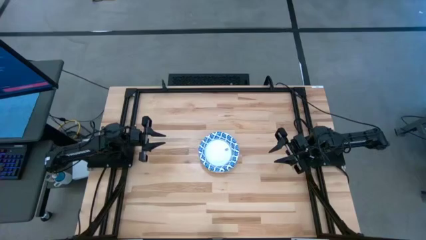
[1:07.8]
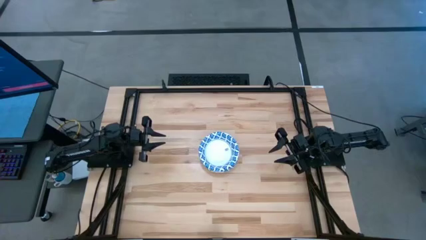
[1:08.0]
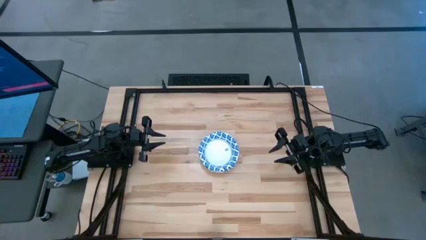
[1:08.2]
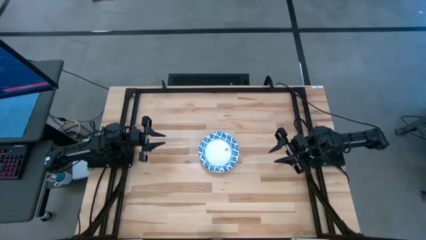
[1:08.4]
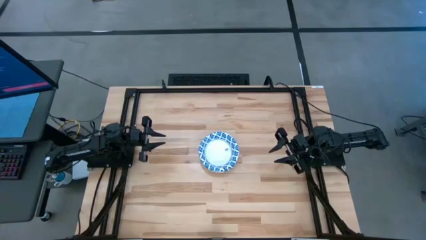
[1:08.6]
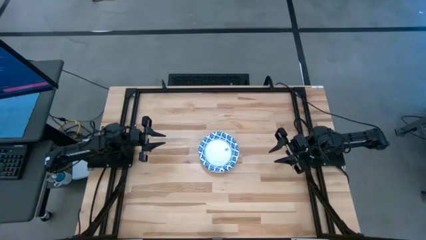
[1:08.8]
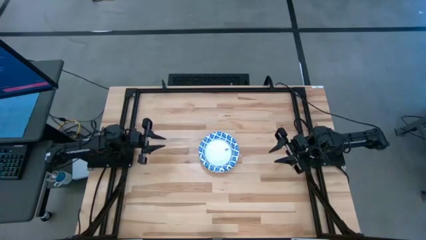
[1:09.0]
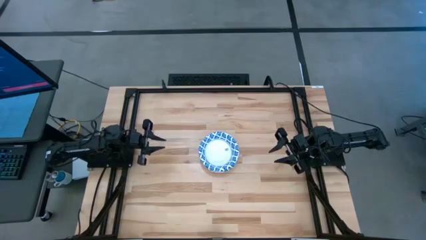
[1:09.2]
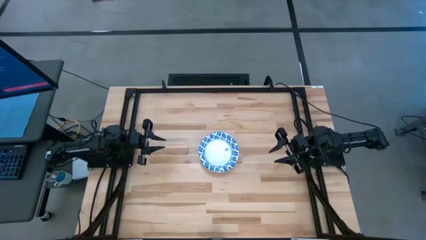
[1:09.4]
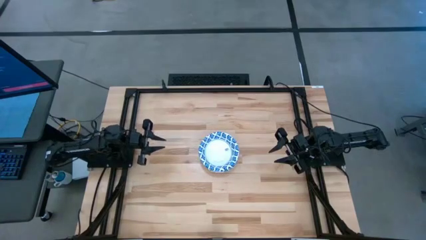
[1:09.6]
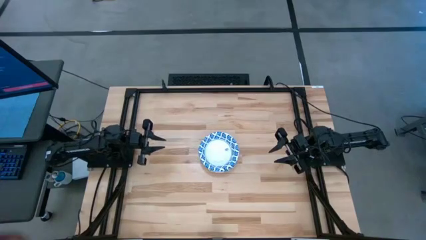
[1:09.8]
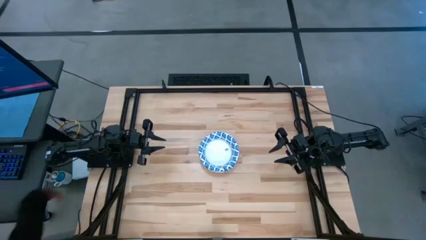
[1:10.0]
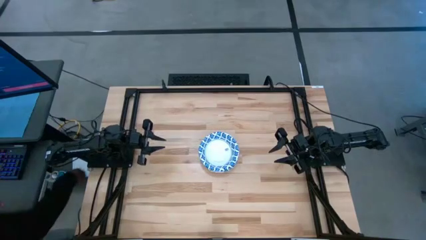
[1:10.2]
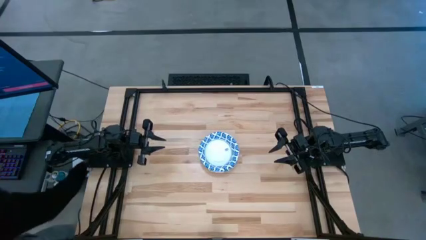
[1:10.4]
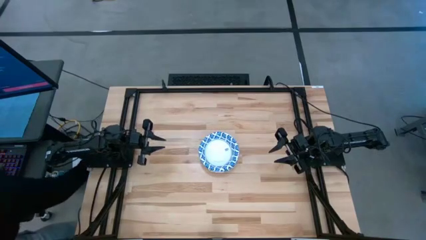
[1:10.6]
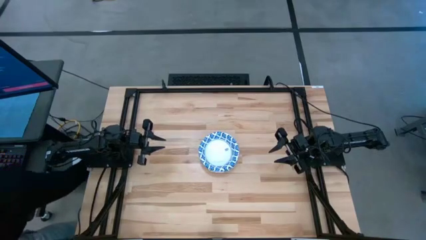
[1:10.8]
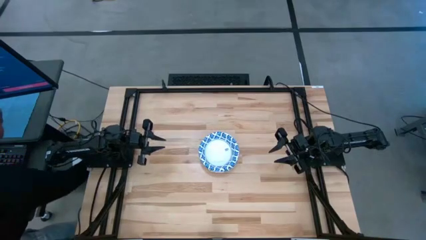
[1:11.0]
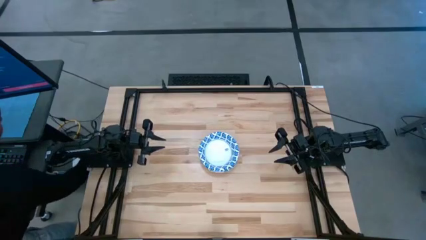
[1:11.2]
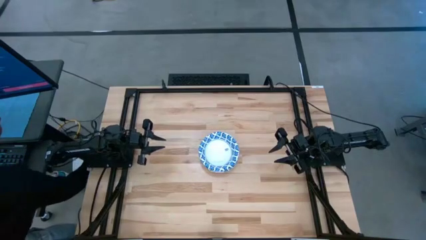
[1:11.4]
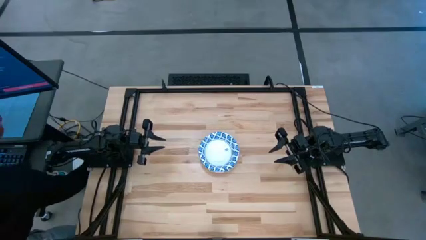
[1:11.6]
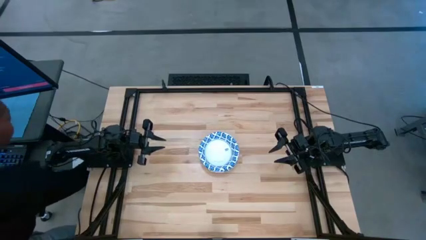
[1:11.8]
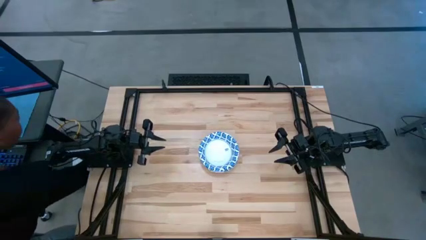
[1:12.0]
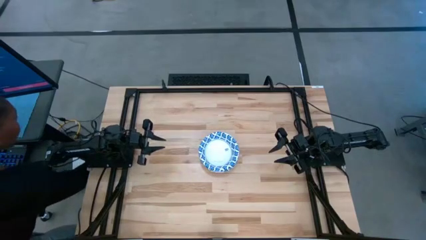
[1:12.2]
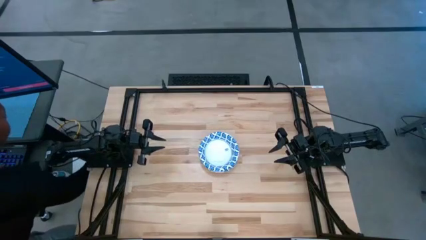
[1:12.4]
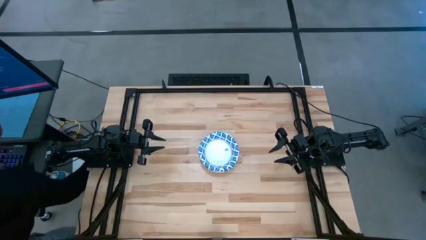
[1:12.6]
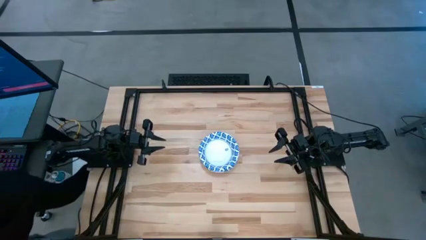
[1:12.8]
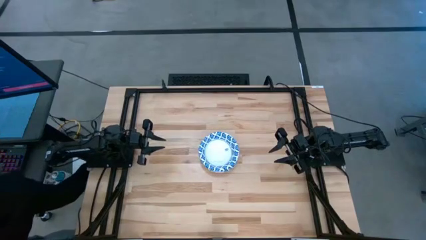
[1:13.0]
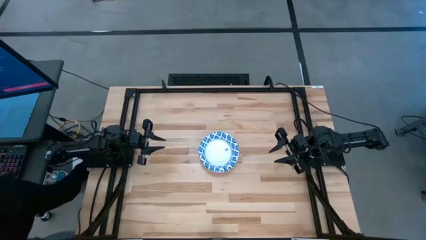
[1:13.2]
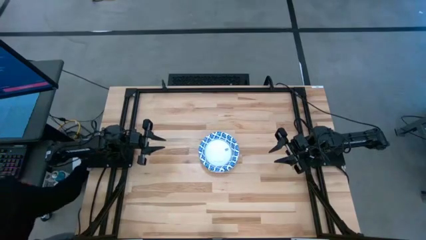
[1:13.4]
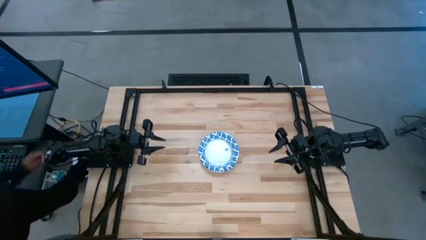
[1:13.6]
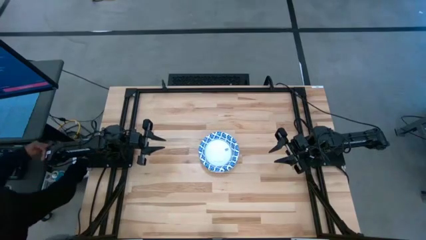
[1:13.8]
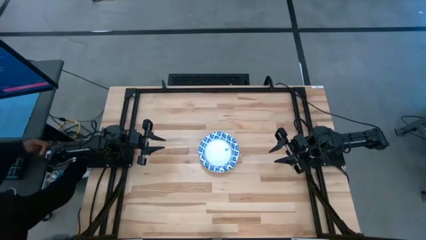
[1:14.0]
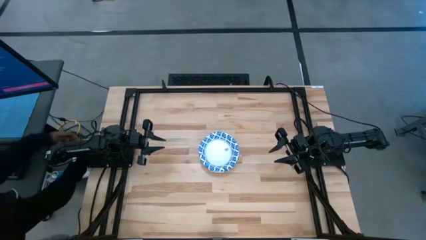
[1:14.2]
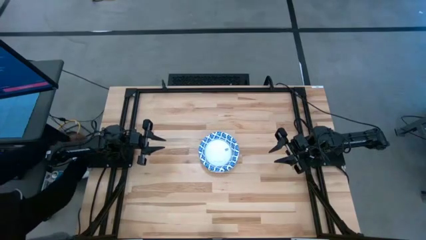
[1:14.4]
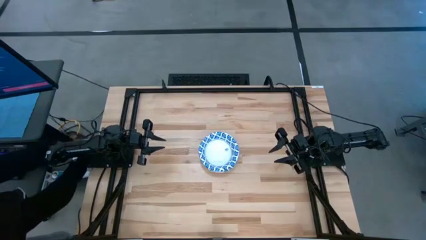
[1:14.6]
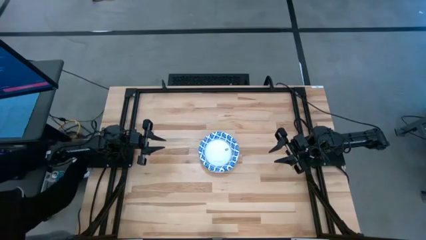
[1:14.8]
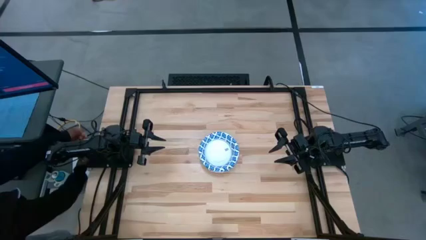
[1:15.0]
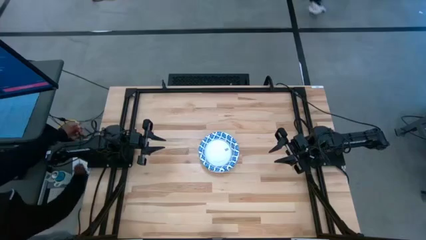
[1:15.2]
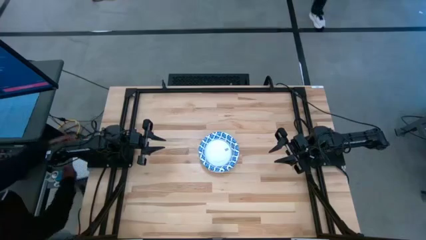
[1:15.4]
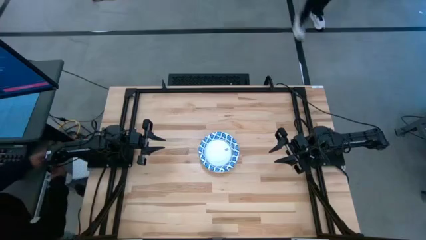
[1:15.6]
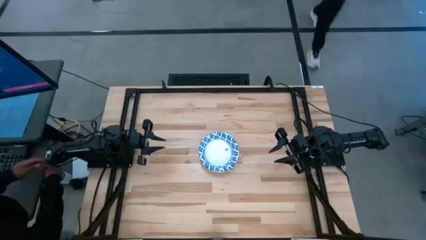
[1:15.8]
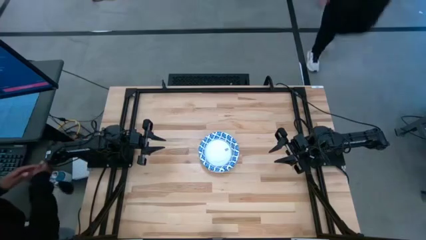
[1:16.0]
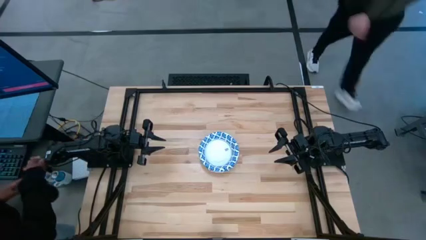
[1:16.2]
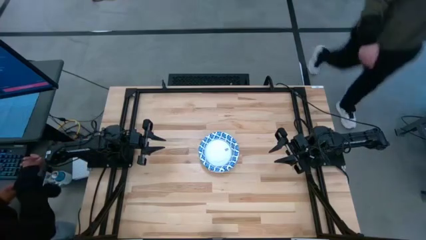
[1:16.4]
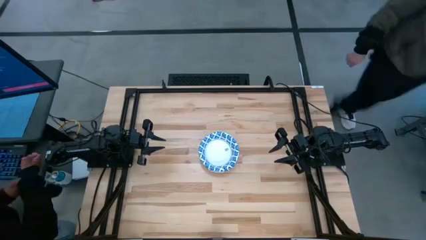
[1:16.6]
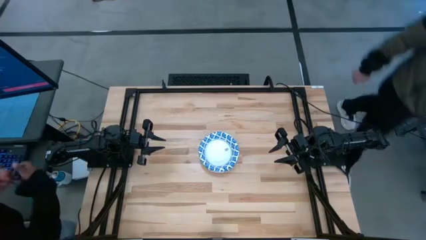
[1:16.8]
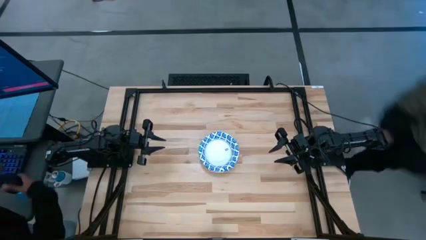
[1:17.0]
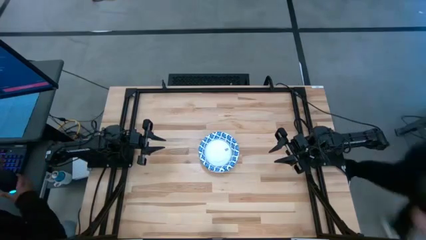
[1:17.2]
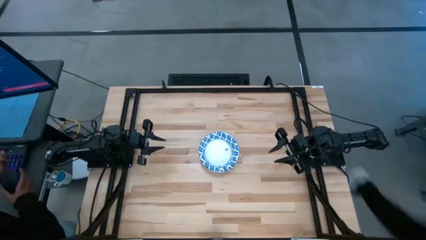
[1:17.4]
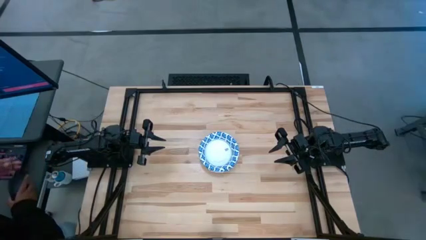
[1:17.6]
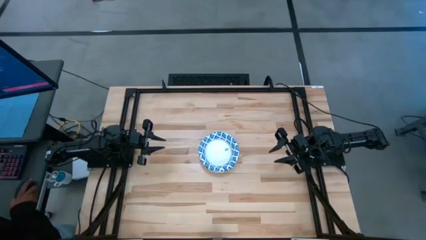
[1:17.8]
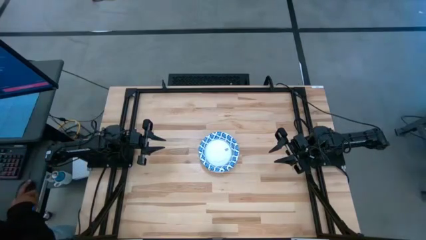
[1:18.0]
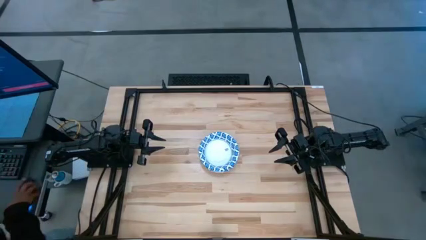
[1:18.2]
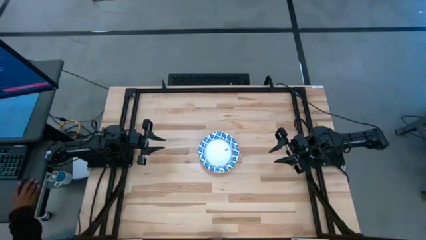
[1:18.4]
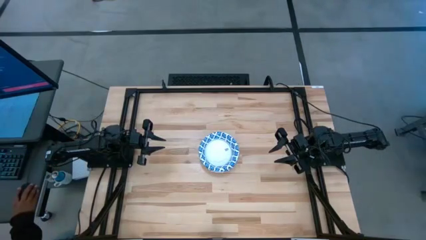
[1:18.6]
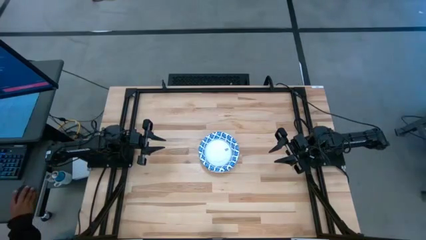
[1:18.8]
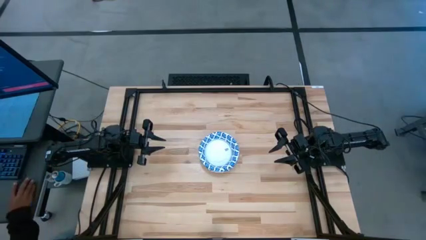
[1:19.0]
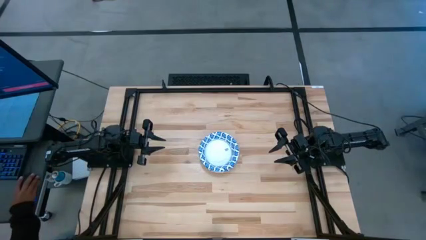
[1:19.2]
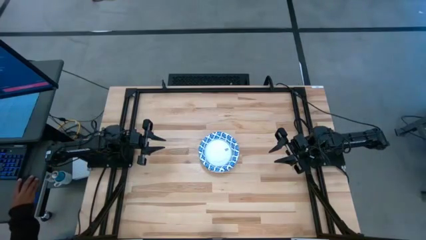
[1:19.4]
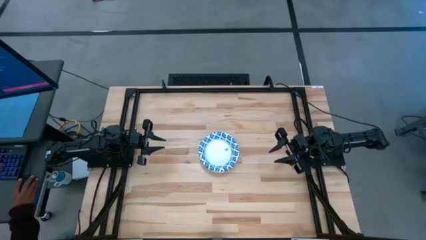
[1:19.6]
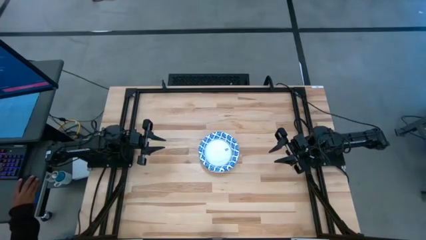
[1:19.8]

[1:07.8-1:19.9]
Task: Nest bowls inside each other
Return to Home Position
